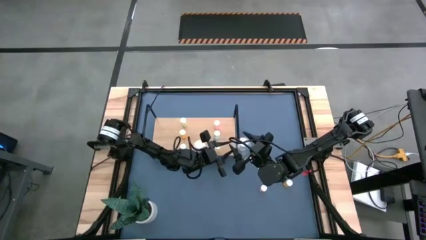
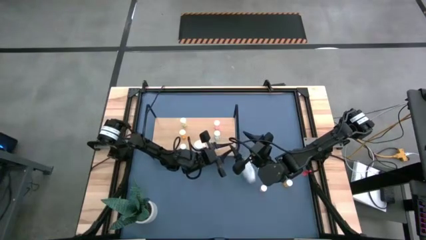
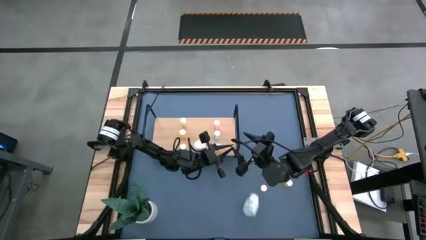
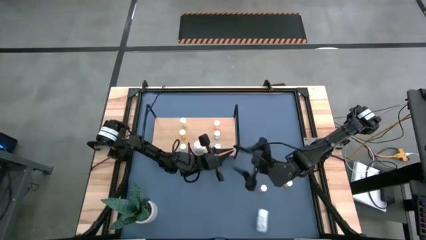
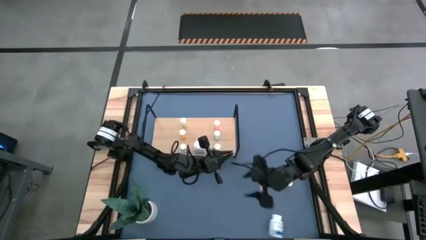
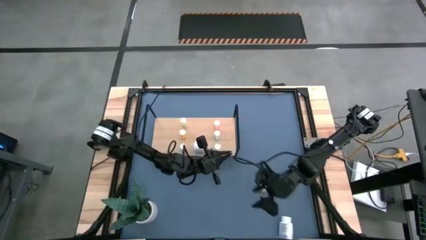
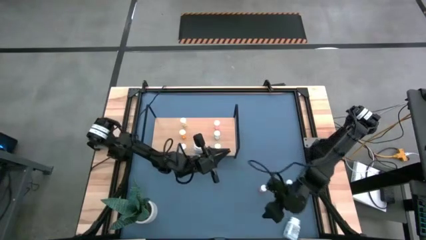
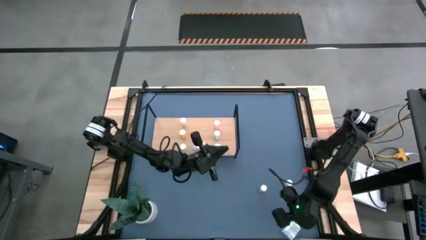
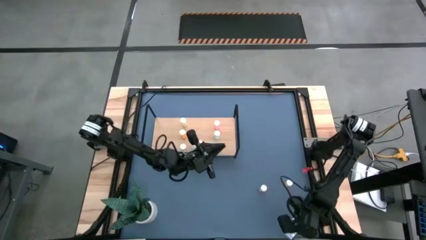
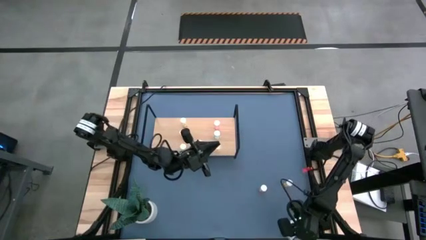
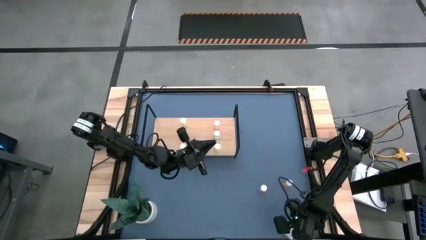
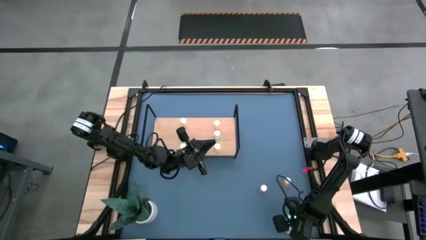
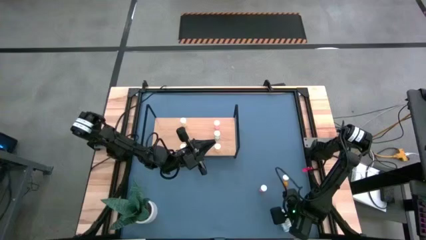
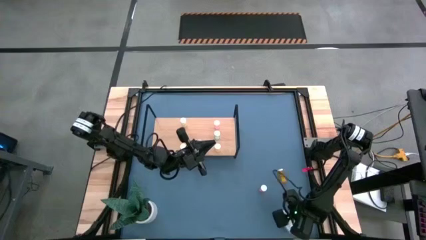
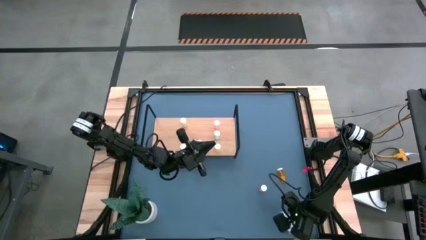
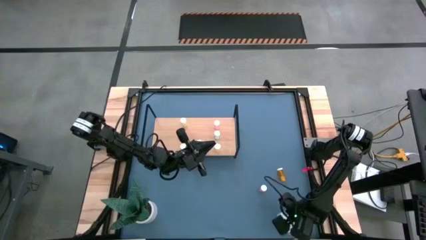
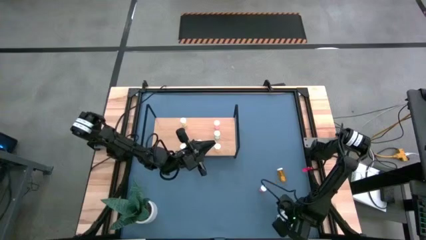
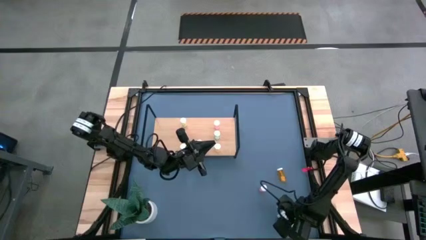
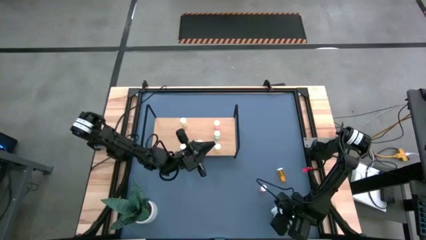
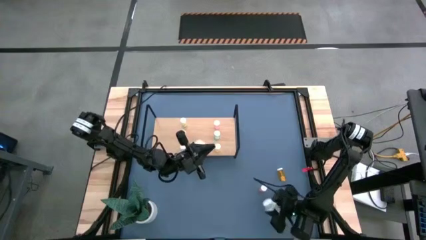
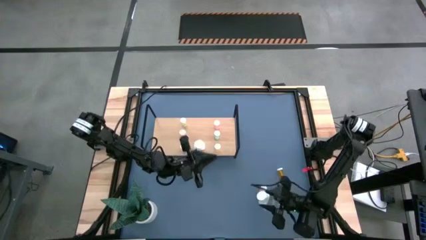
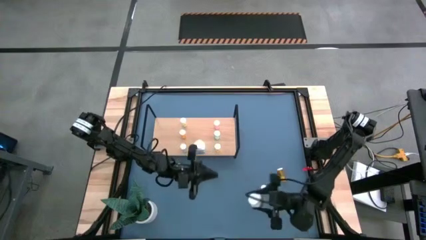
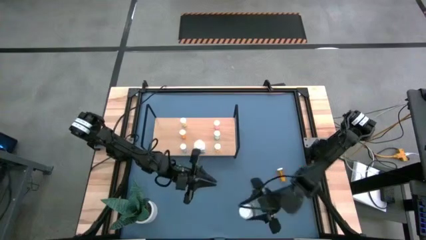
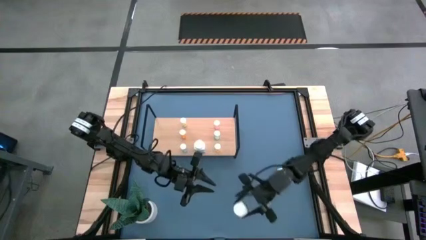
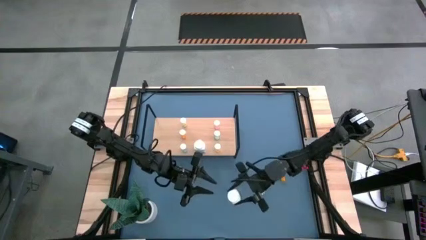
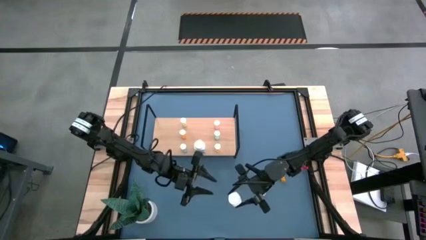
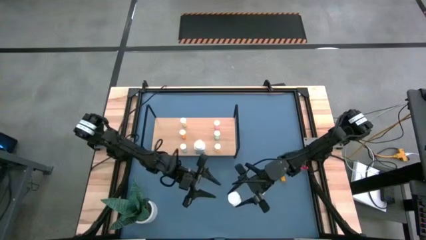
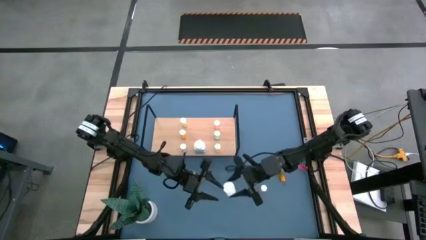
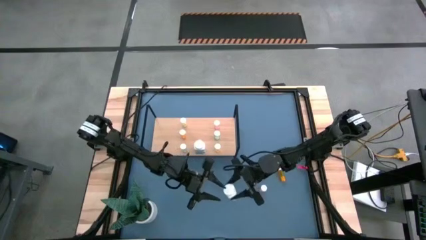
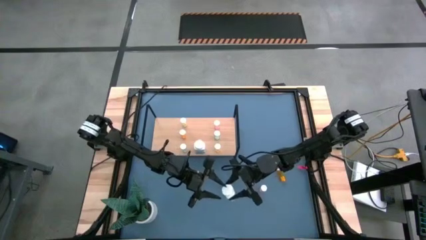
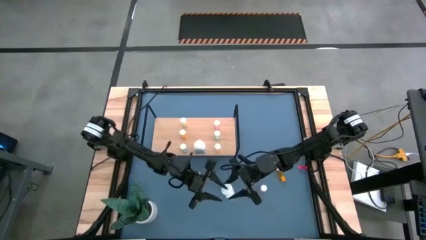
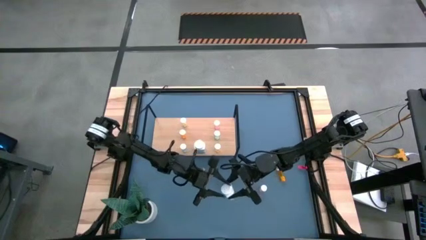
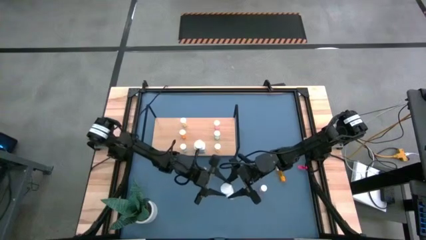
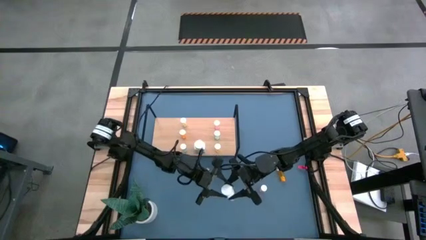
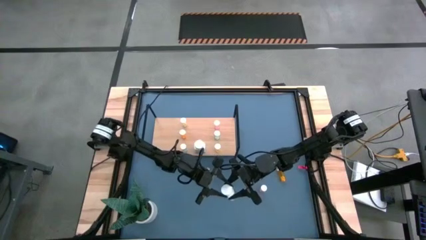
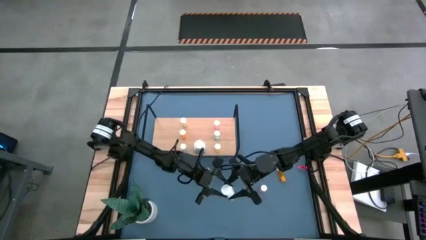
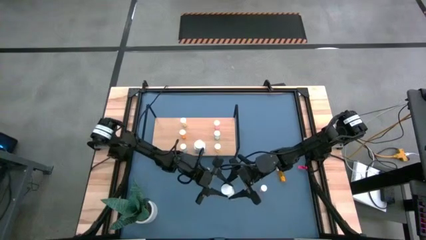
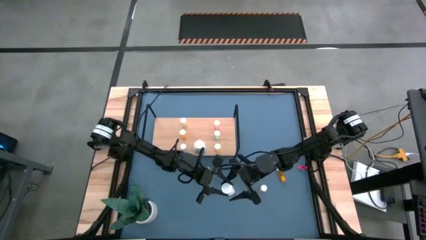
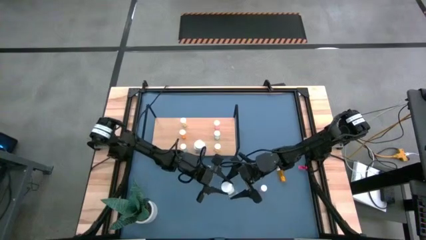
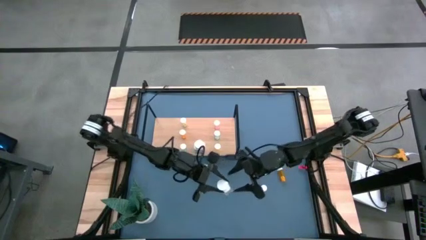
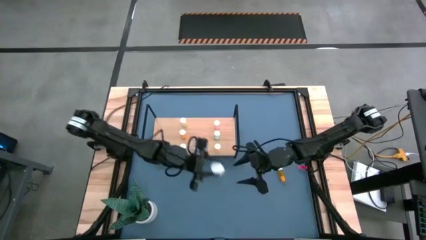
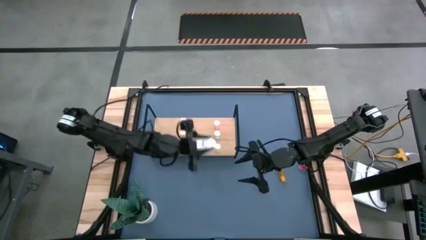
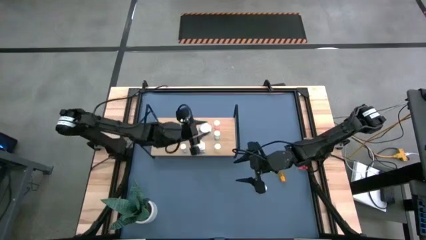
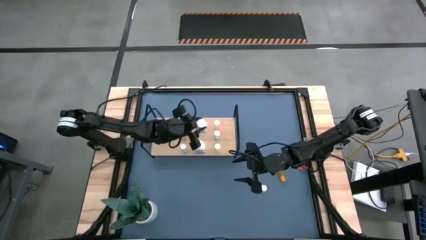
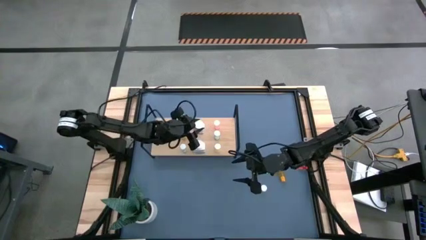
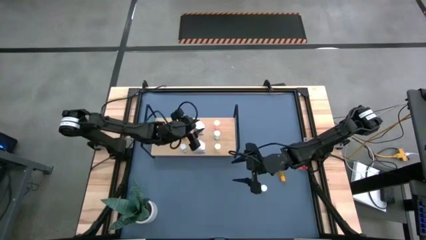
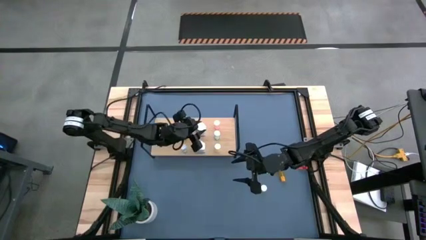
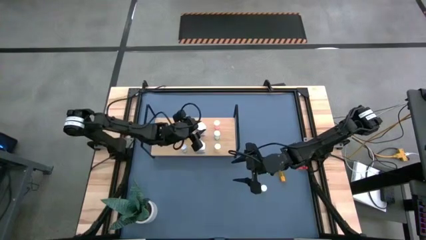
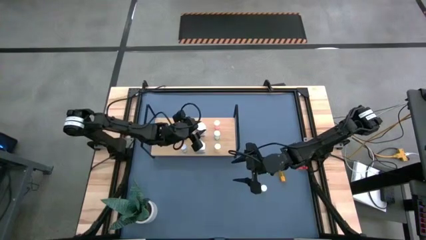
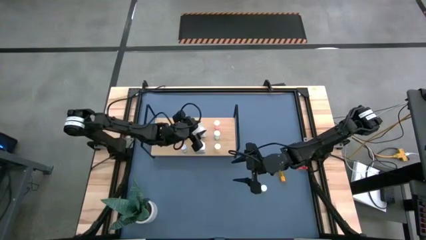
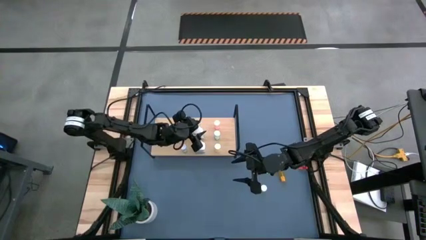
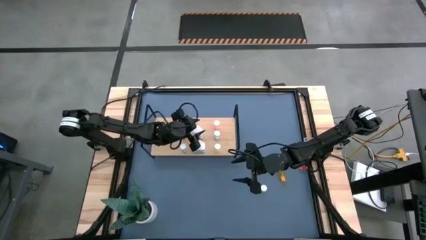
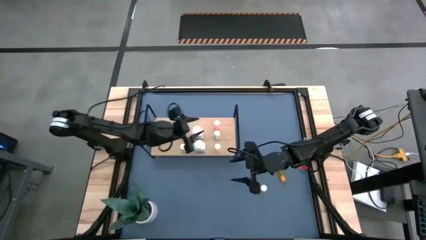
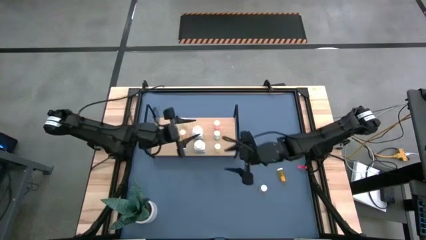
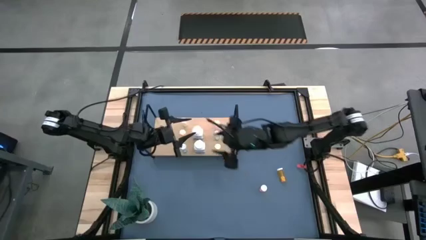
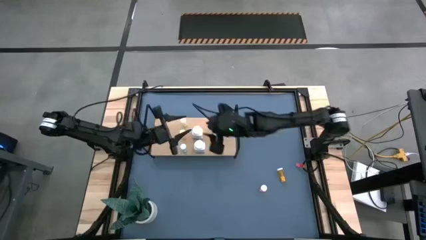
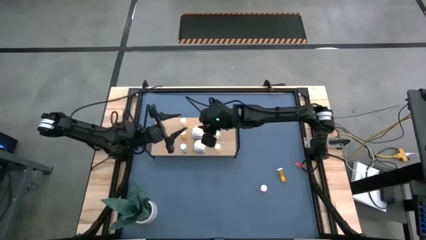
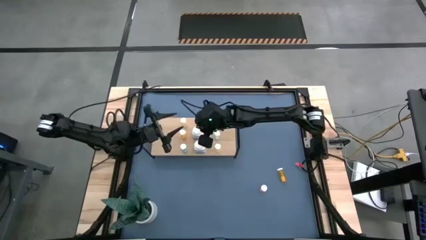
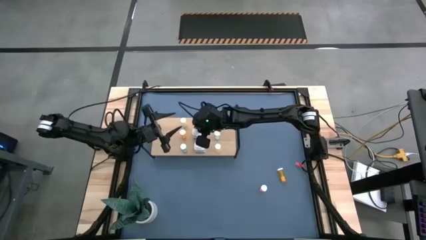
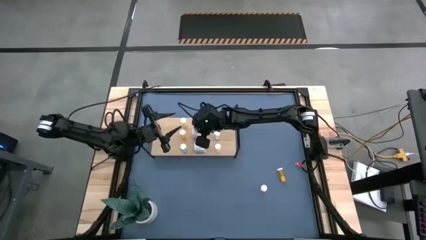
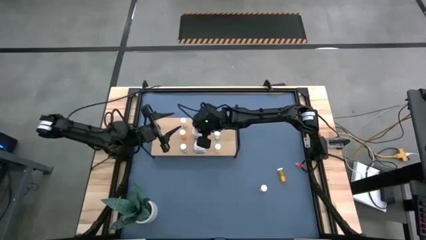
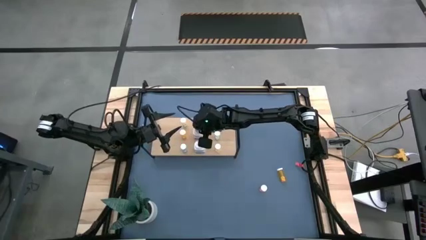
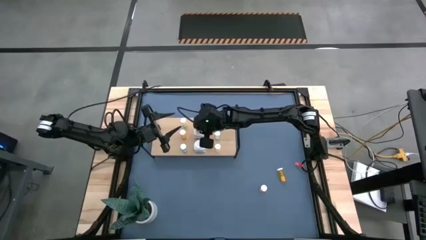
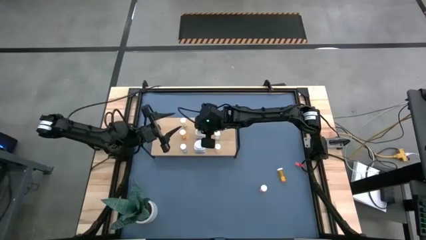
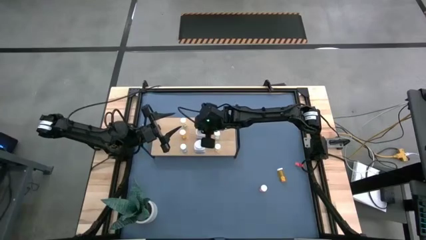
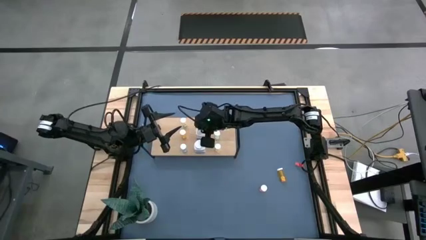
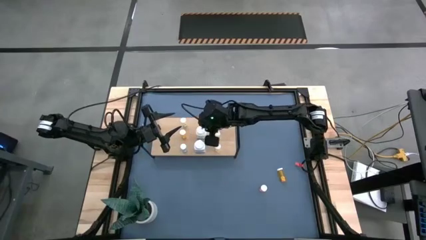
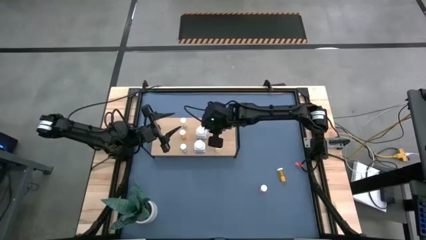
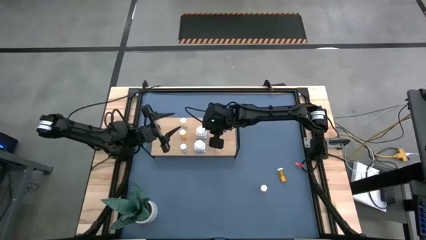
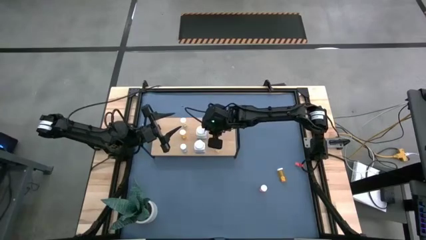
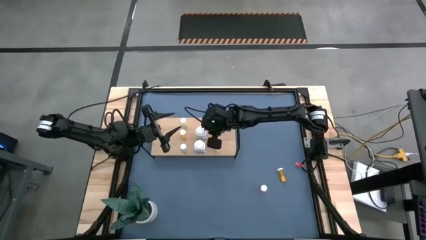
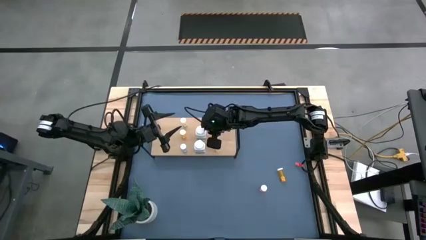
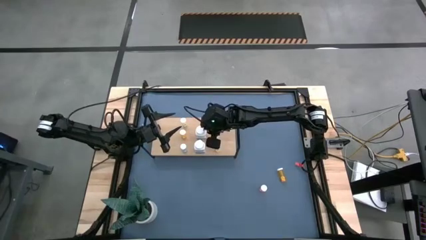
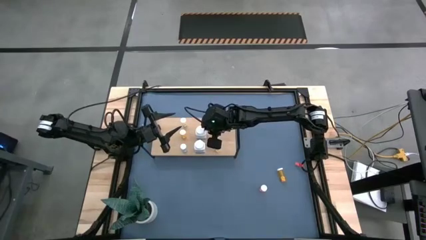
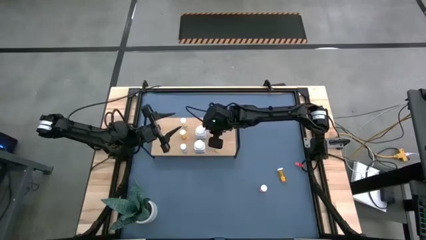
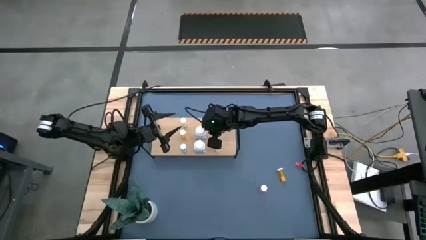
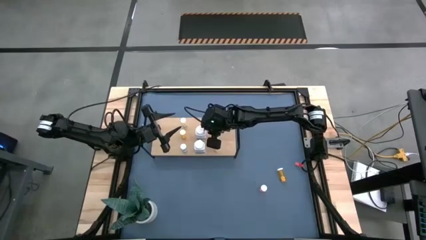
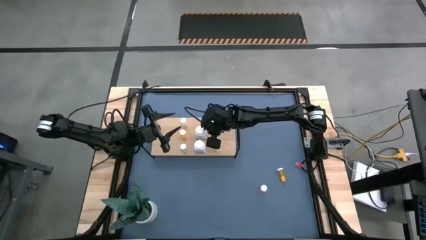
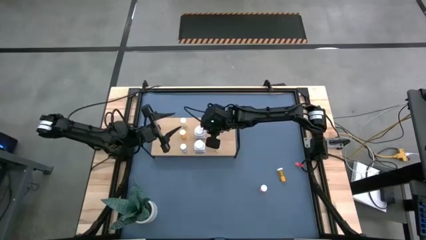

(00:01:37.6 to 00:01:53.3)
Task: Pick and place medicine bottles onto shelf by color
Put the white pill bottle on the shelf
